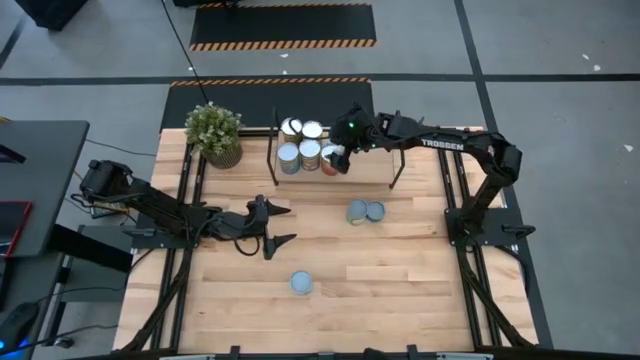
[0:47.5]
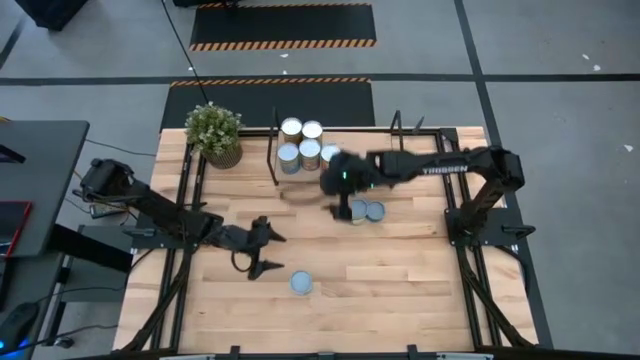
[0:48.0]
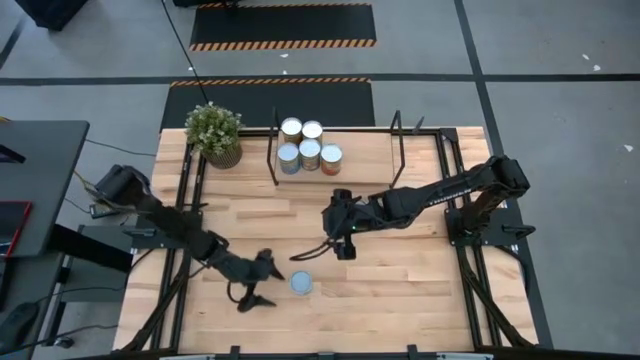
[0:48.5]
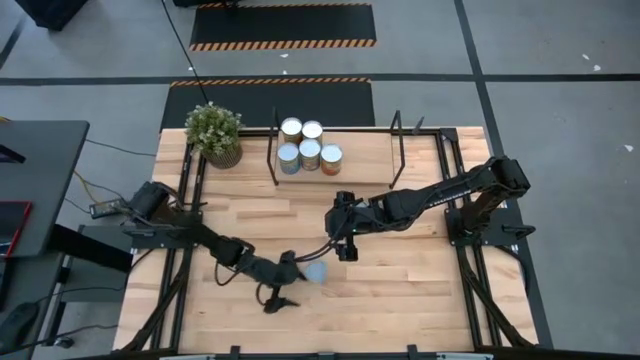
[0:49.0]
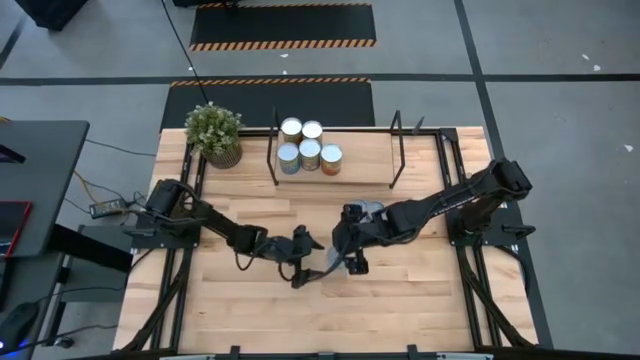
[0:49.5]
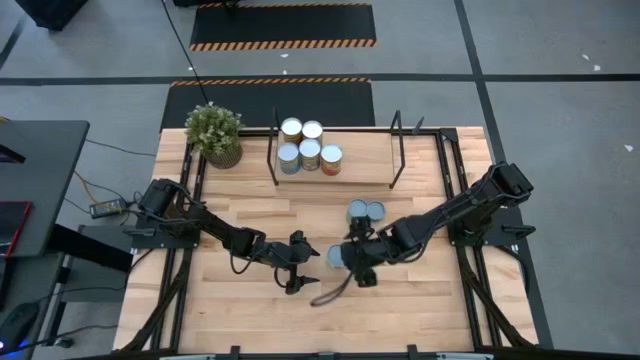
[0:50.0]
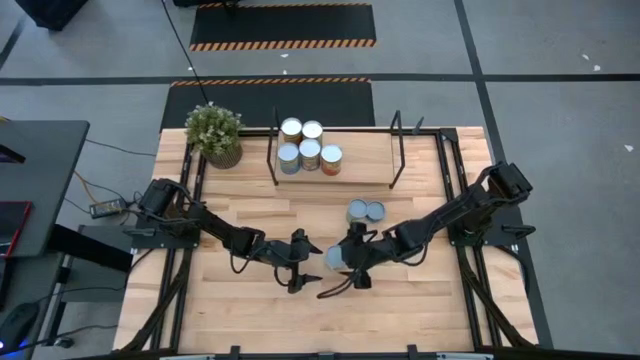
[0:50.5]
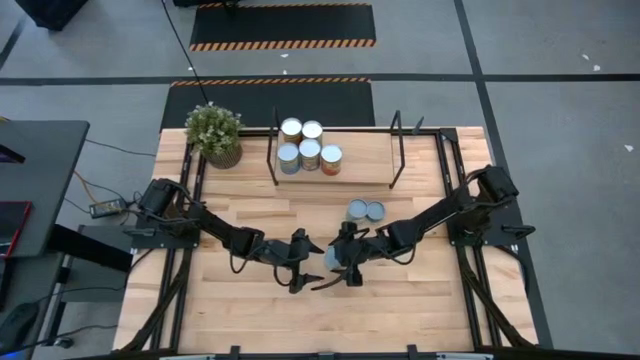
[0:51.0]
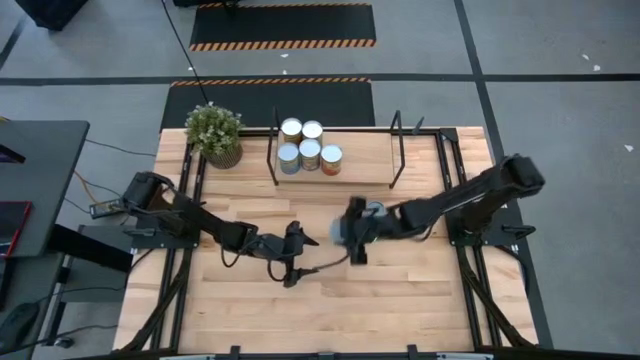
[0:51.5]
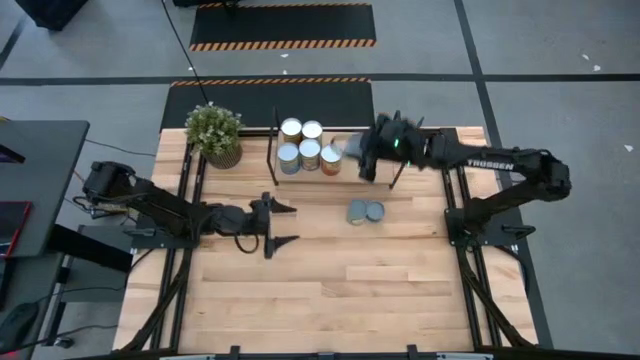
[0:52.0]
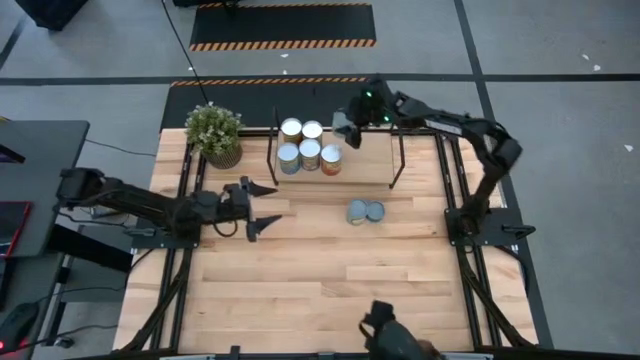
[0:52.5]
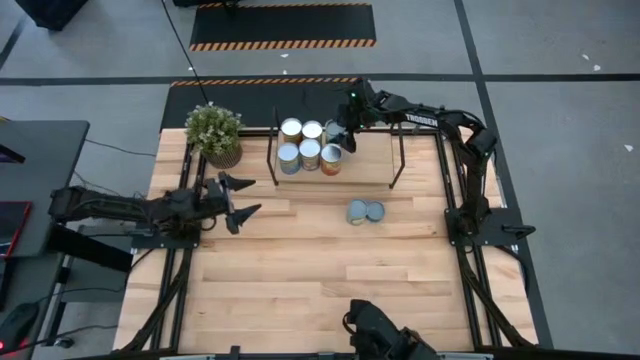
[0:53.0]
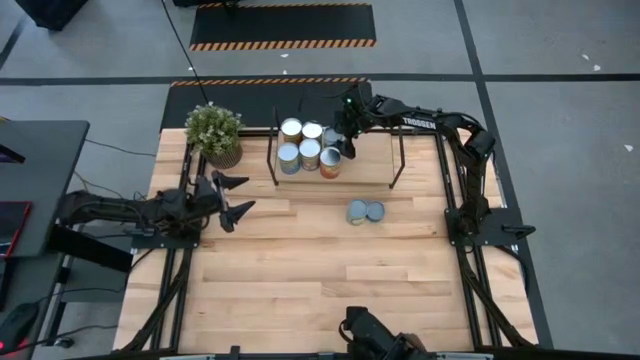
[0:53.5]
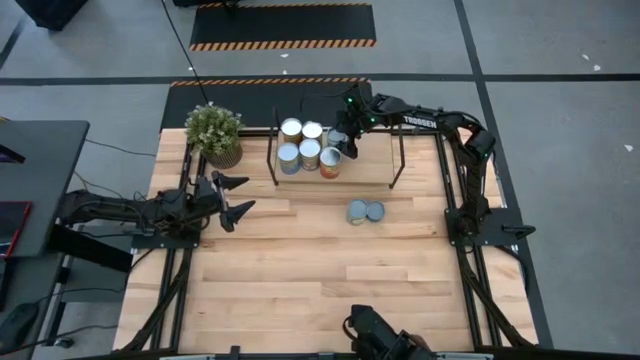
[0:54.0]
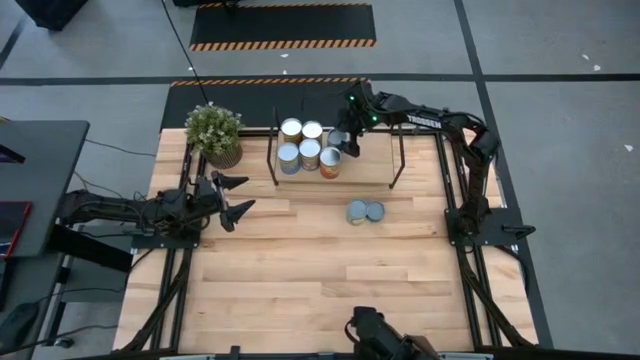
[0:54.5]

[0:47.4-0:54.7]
Task: Pick and place cans onto a shelf
Put the canned vegetables on the shelf

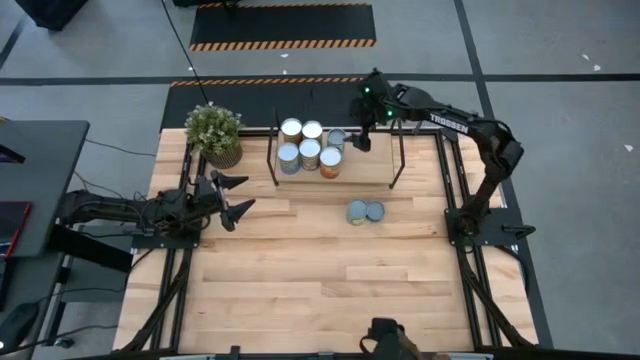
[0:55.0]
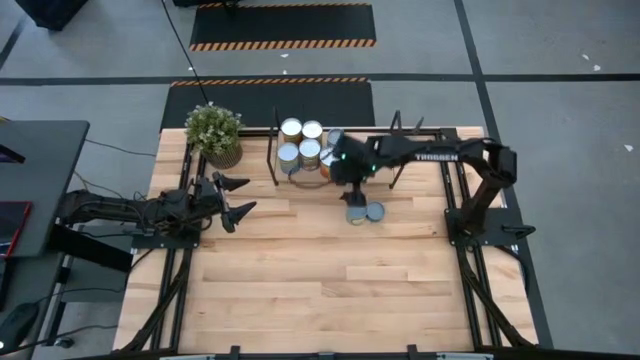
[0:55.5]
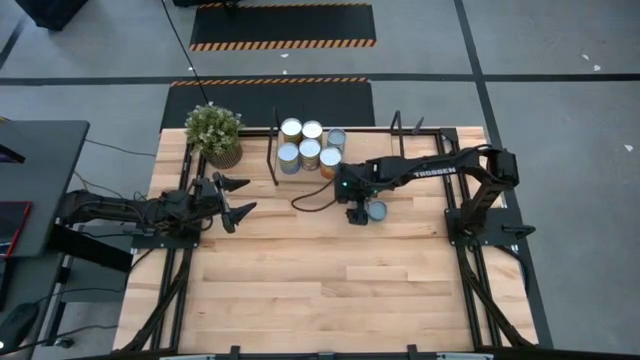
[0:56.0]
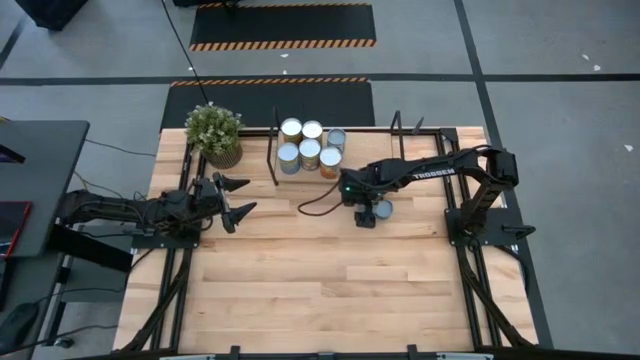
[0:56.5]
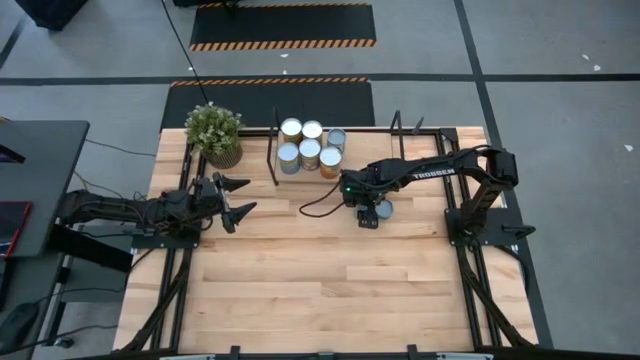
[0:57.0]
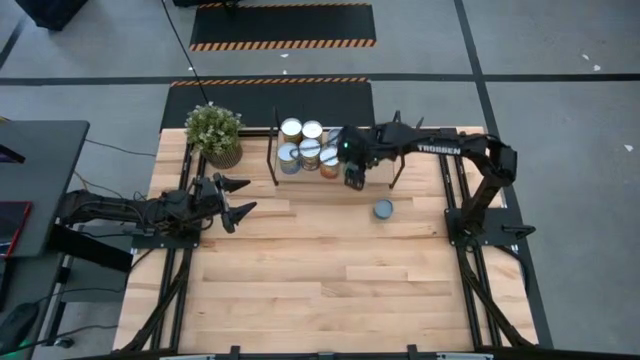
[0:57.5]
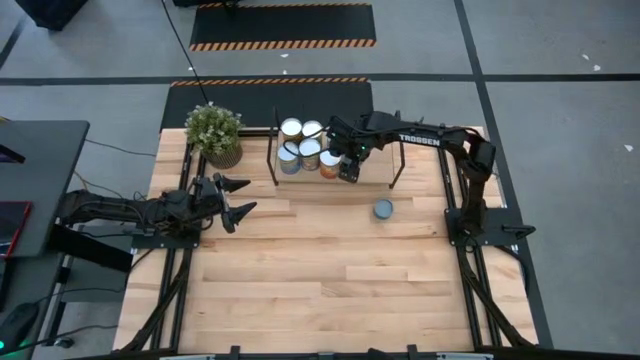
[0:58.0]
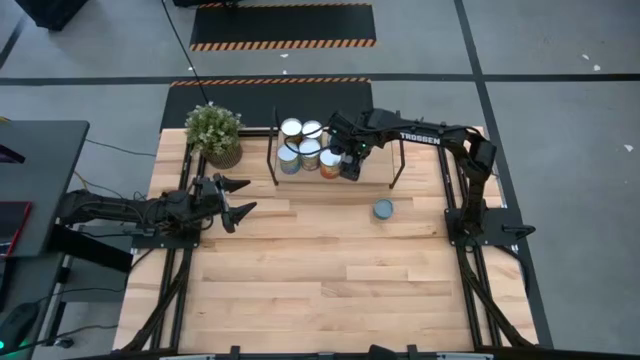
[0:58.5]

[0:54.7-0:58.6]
Put the canned soup on the shelf

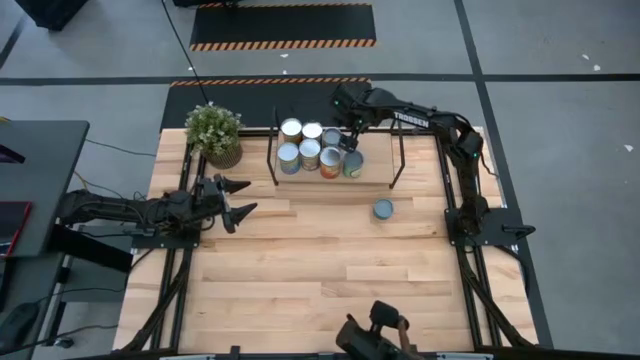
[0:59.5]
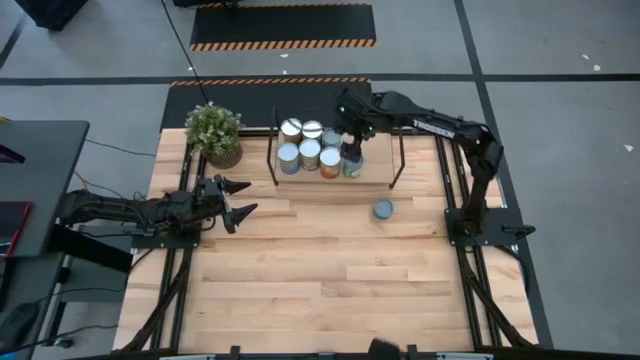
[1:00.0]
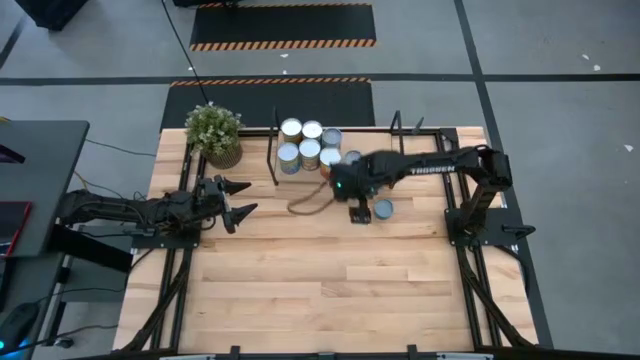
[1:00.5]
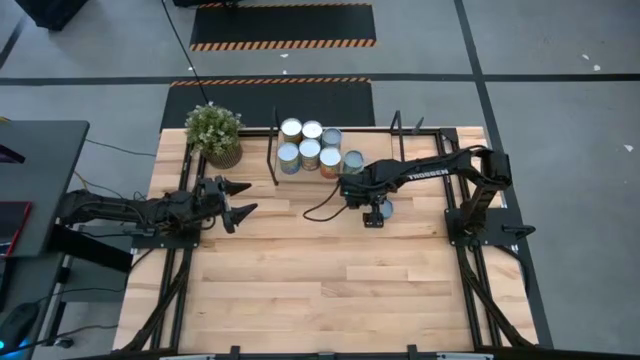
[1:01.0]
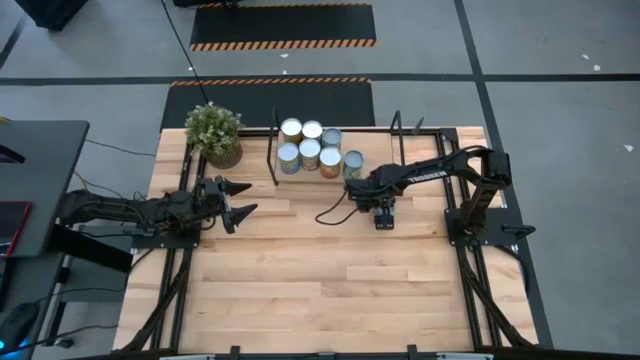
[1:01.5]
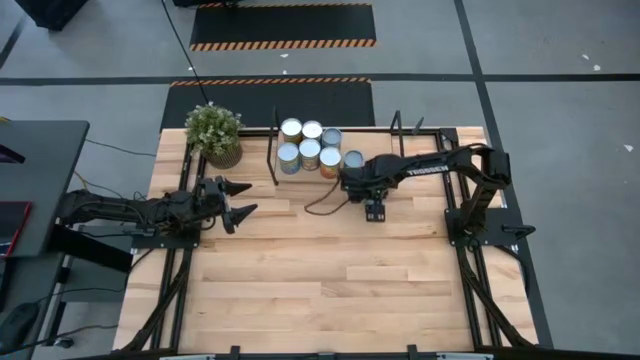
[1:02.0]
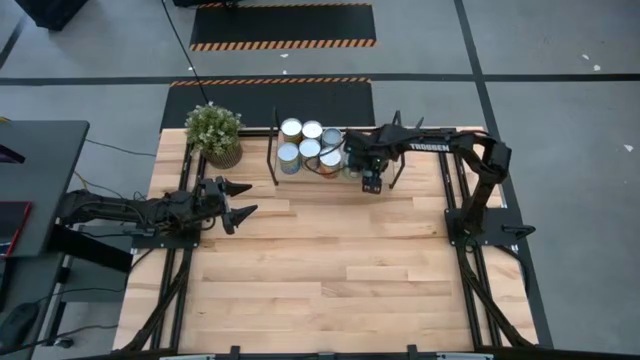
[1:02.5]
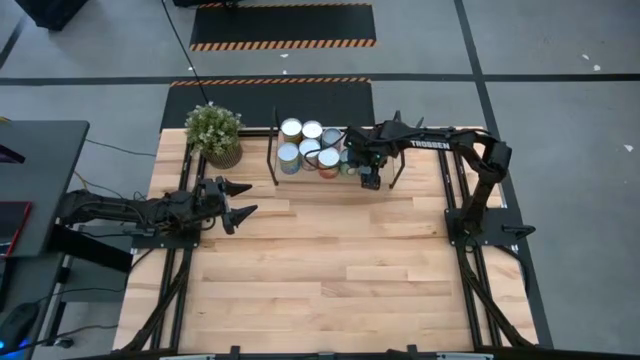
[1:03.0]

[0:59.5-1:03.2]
Put the blue tuna can on the shelf

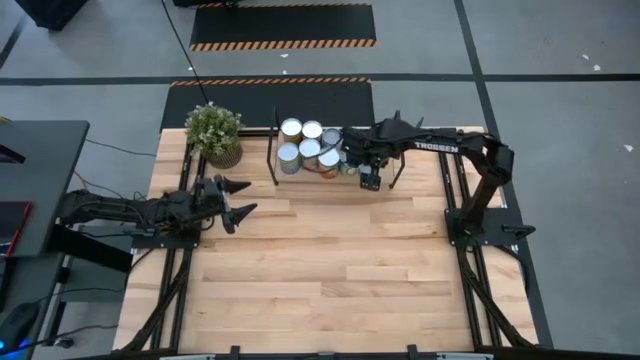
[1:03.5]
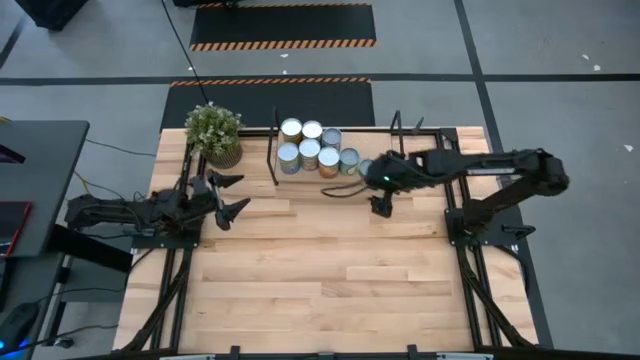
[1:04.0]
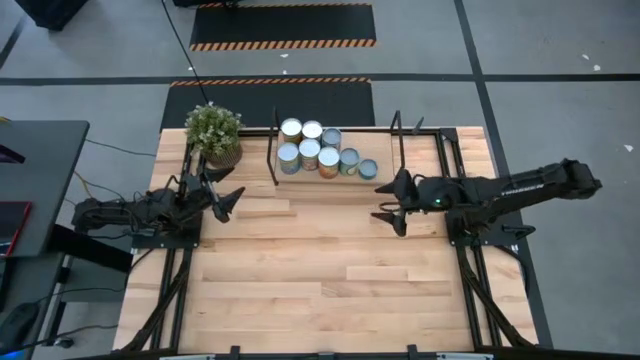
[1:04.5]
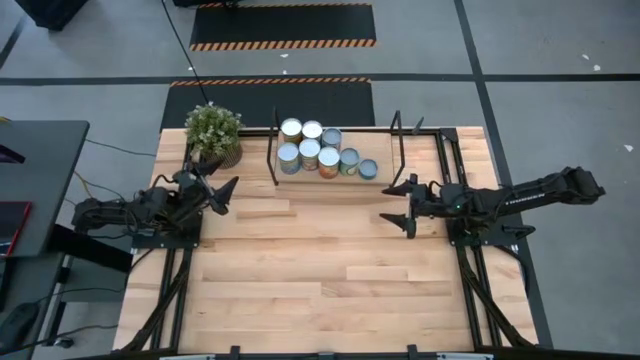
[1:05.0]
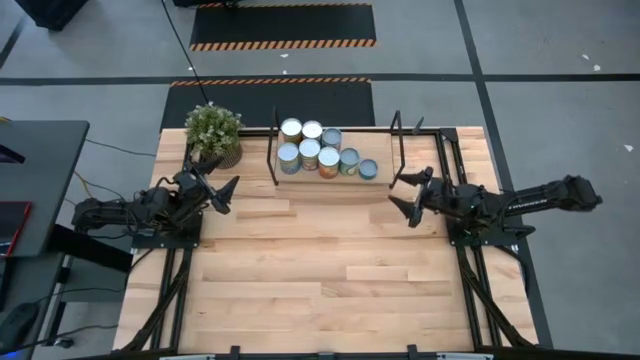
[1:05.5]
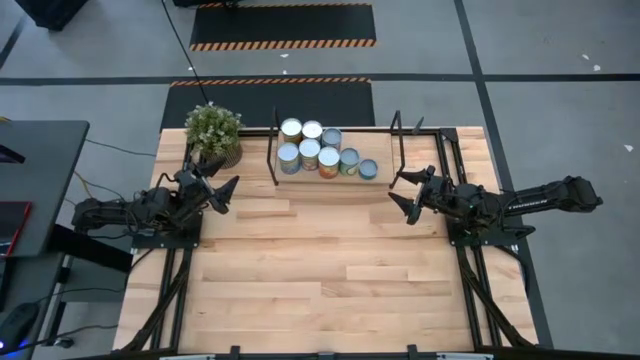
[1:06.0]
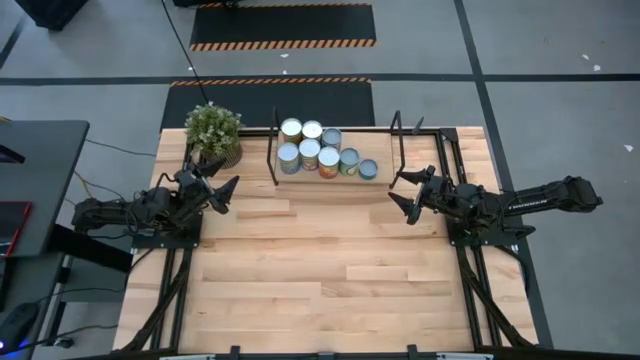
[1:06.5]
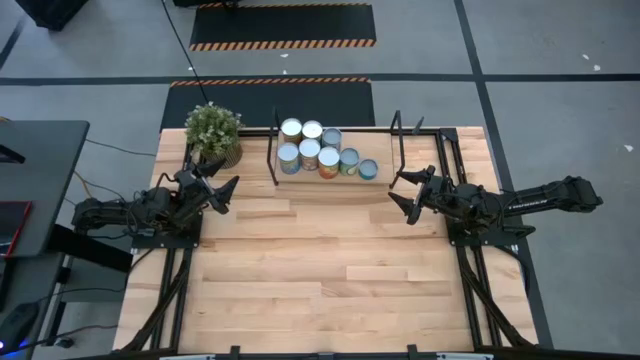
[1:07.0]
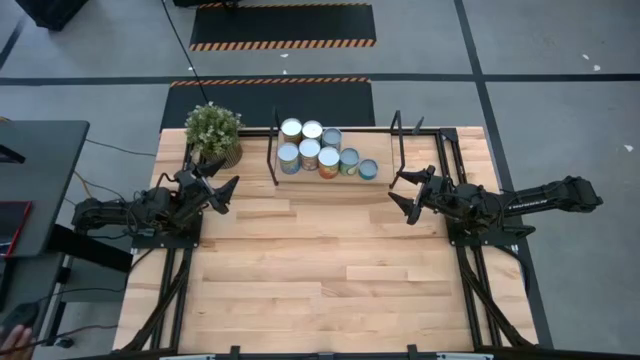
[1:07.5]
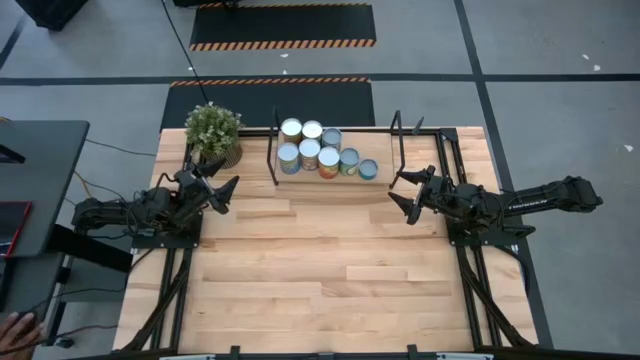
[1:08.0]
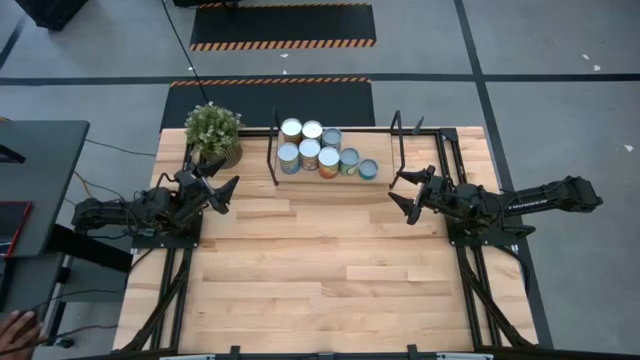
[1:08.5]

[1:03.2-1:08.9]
Return to Home Position

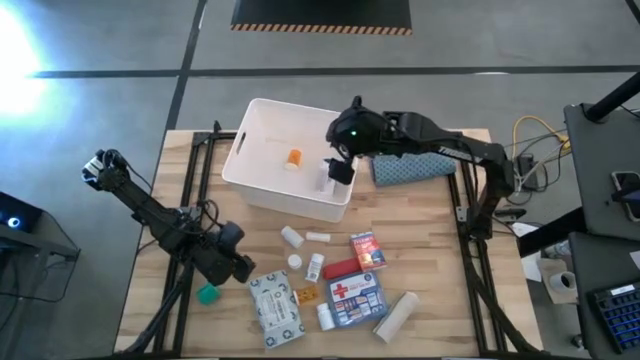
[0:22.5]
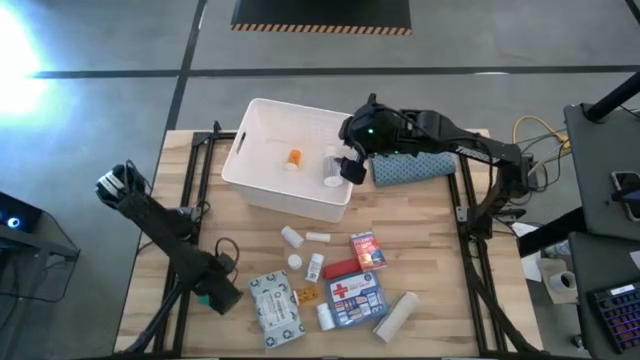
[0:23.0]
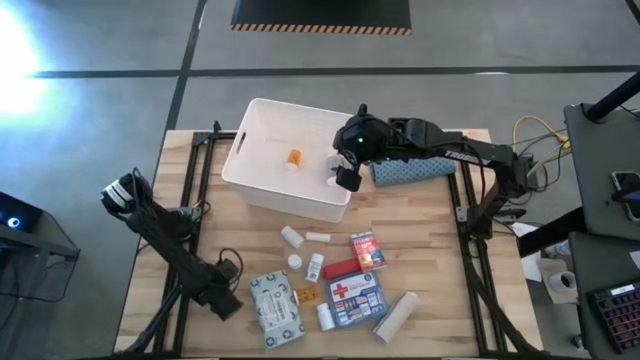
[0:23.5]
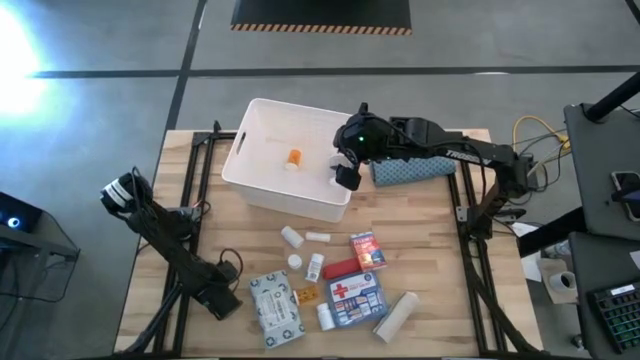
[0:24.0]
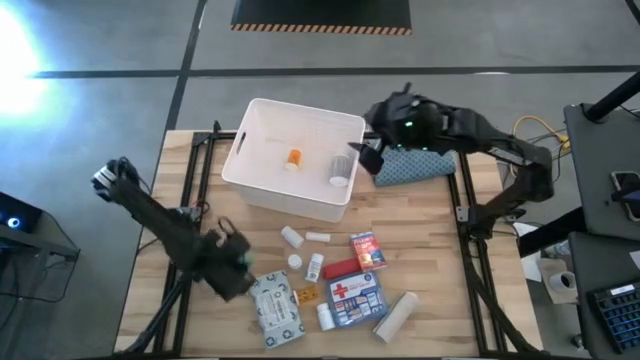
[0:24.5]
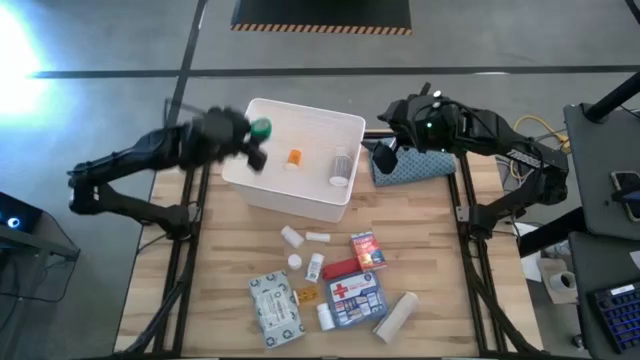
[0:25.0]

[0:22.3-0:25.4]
Task: Pick & place medical supplies in basket/bin
Put the green bandage roll into the white bin
